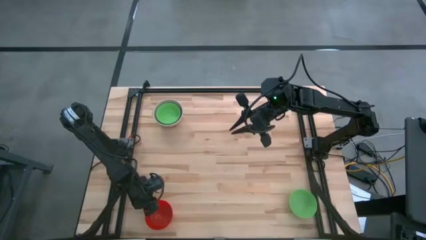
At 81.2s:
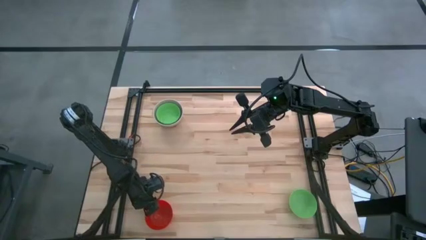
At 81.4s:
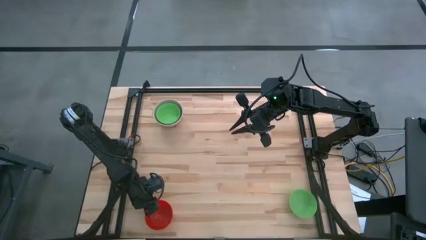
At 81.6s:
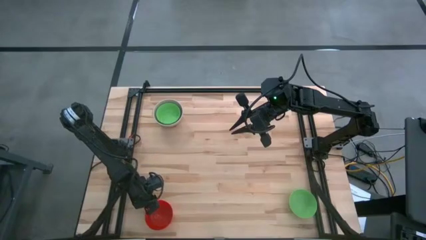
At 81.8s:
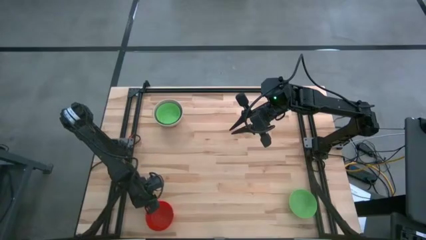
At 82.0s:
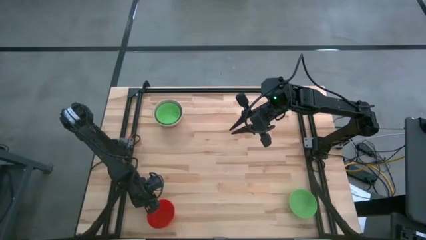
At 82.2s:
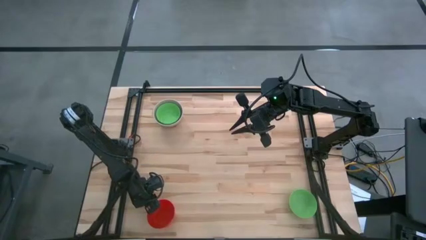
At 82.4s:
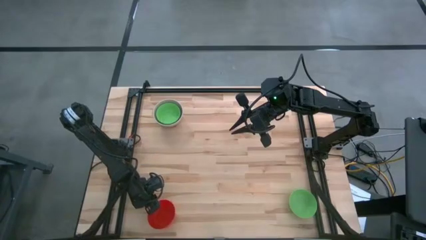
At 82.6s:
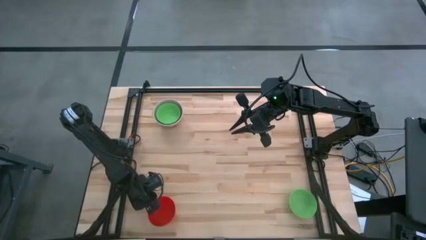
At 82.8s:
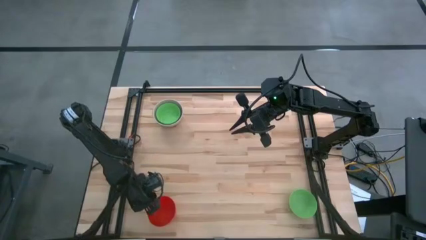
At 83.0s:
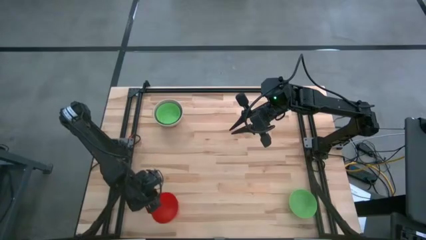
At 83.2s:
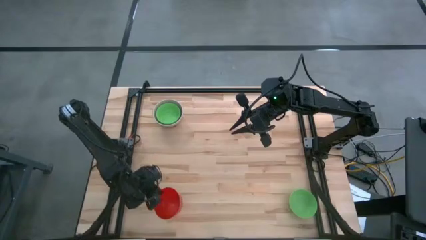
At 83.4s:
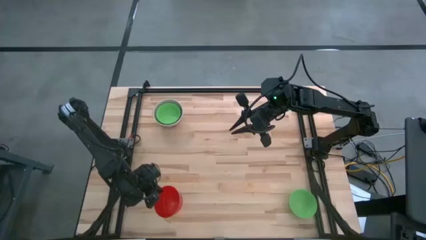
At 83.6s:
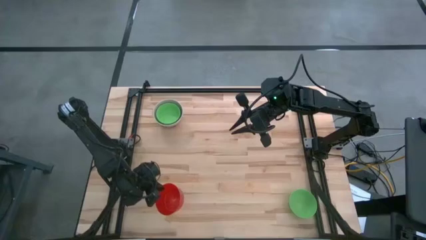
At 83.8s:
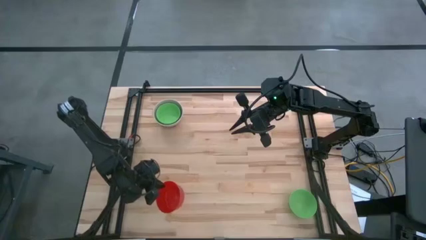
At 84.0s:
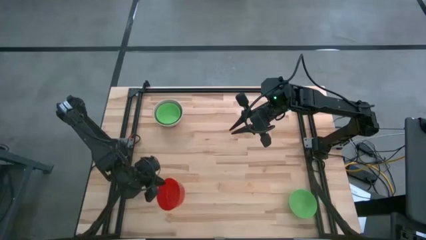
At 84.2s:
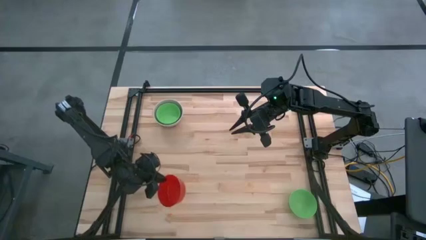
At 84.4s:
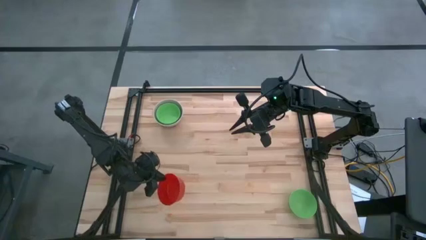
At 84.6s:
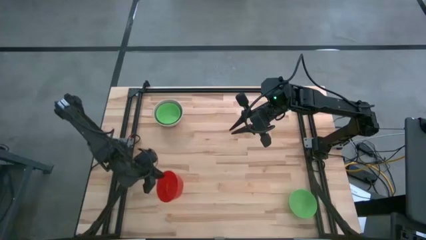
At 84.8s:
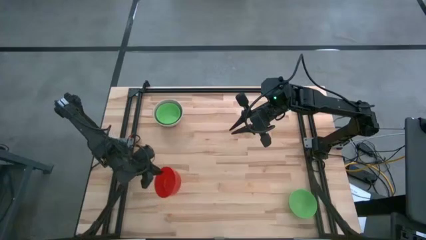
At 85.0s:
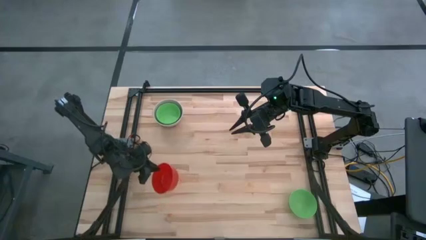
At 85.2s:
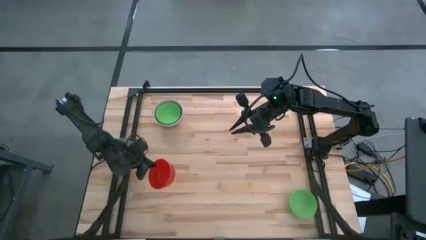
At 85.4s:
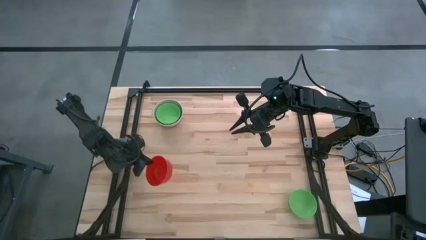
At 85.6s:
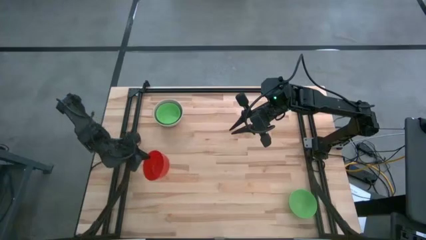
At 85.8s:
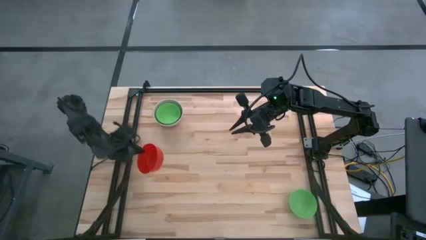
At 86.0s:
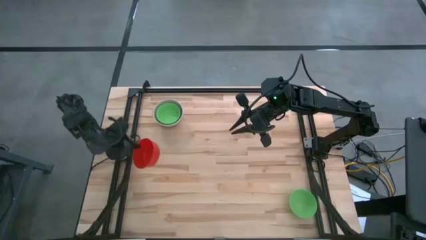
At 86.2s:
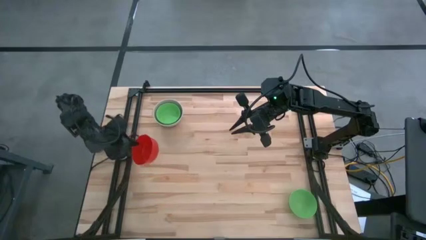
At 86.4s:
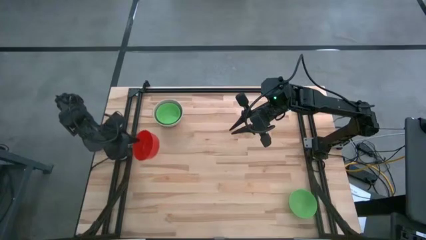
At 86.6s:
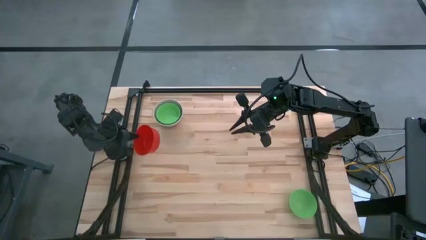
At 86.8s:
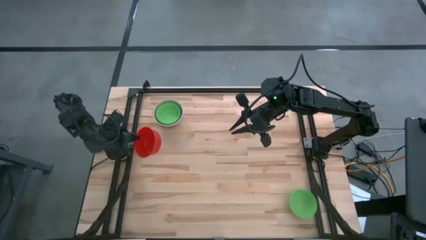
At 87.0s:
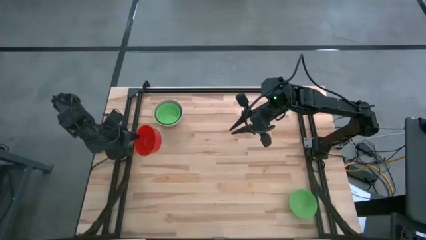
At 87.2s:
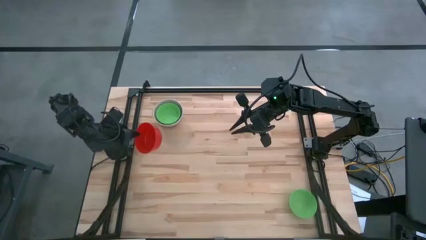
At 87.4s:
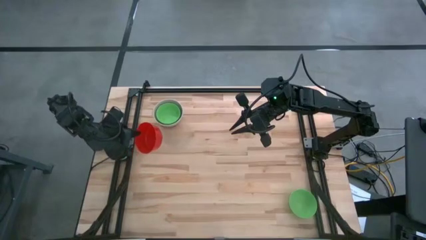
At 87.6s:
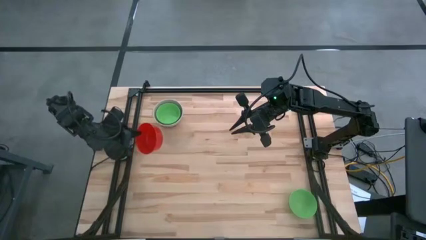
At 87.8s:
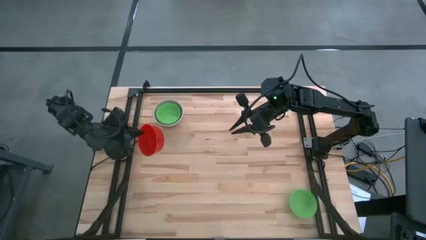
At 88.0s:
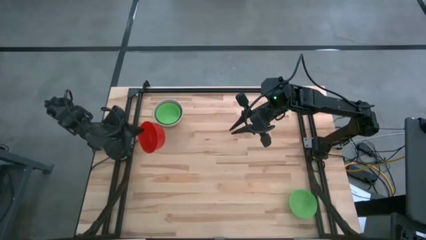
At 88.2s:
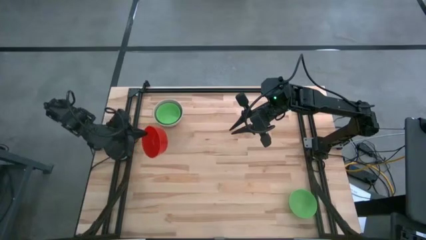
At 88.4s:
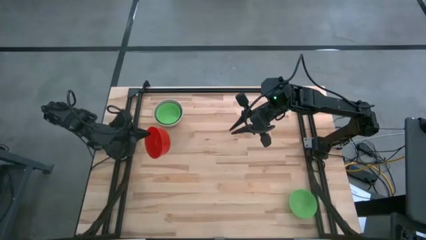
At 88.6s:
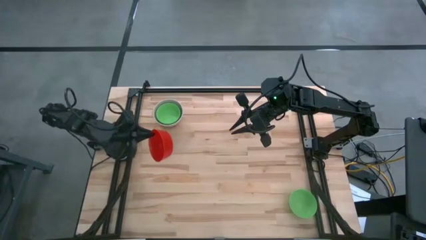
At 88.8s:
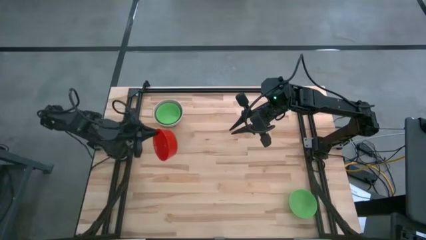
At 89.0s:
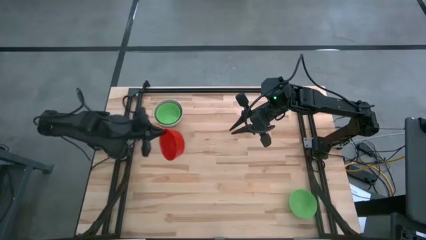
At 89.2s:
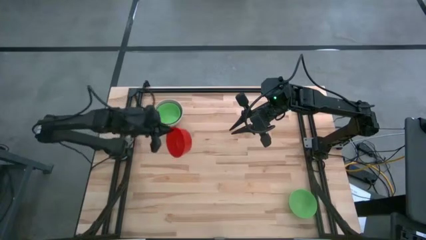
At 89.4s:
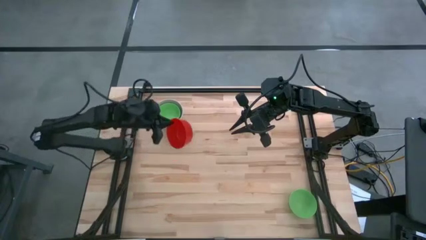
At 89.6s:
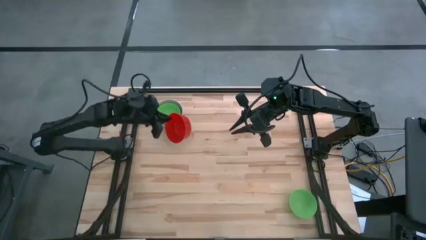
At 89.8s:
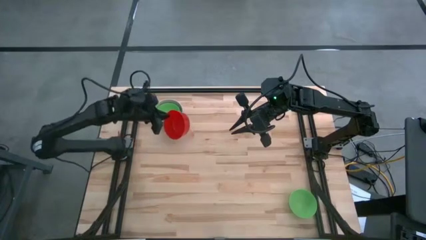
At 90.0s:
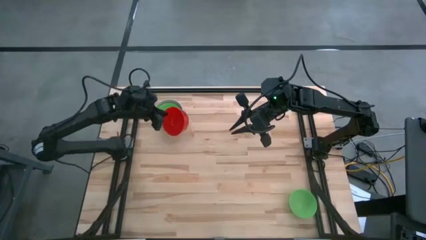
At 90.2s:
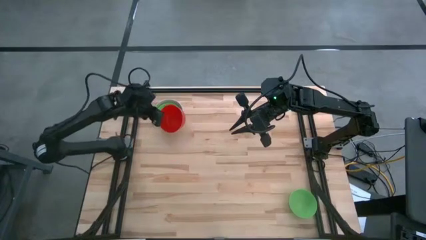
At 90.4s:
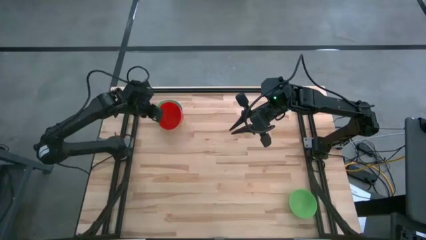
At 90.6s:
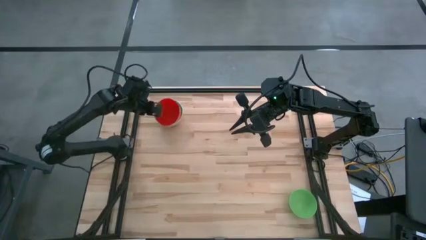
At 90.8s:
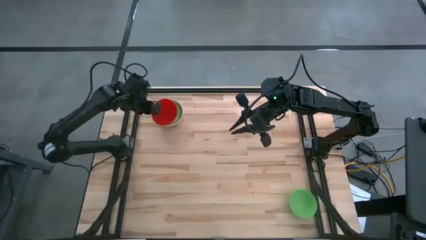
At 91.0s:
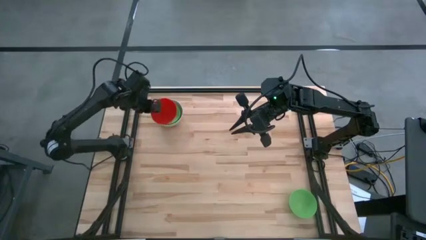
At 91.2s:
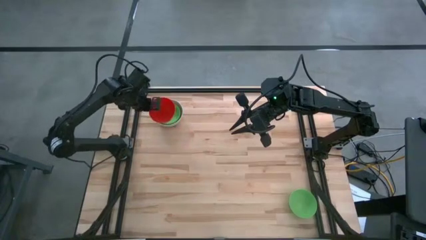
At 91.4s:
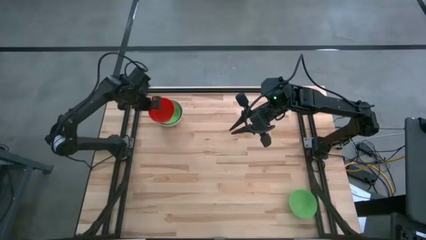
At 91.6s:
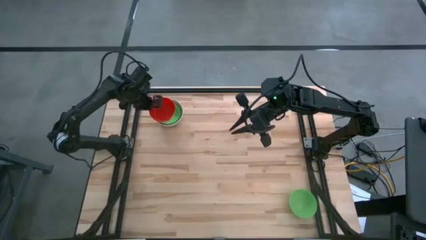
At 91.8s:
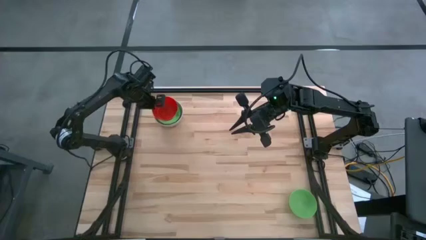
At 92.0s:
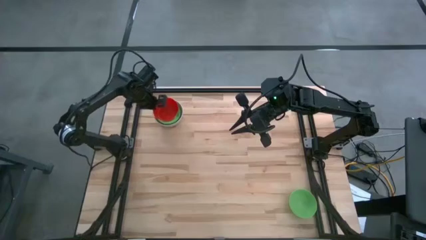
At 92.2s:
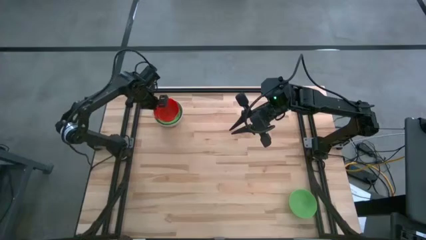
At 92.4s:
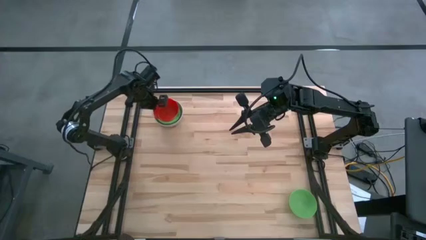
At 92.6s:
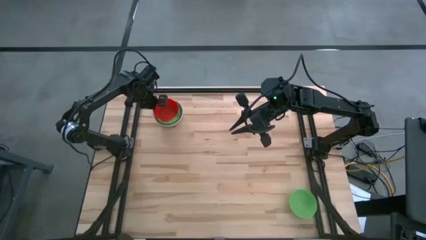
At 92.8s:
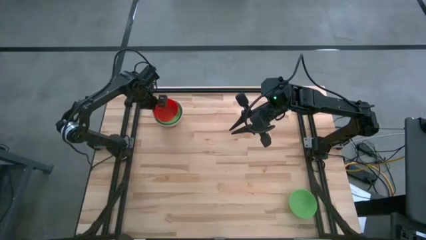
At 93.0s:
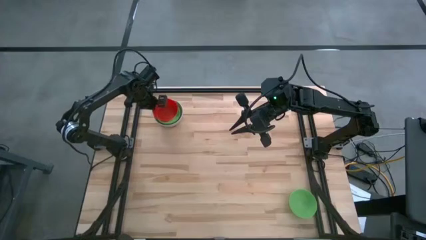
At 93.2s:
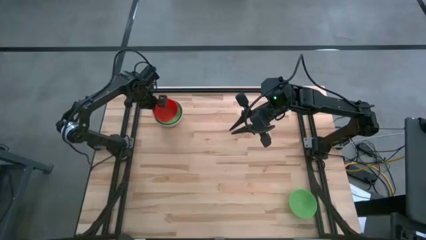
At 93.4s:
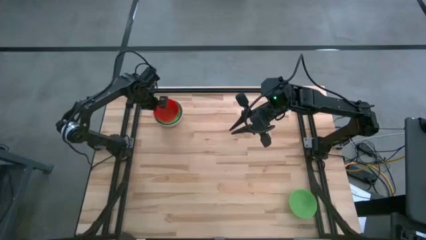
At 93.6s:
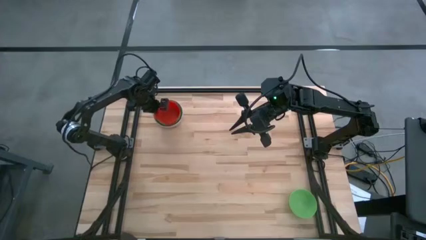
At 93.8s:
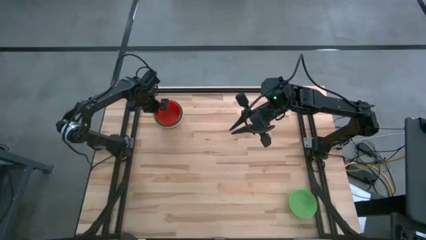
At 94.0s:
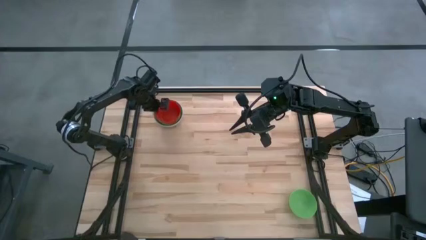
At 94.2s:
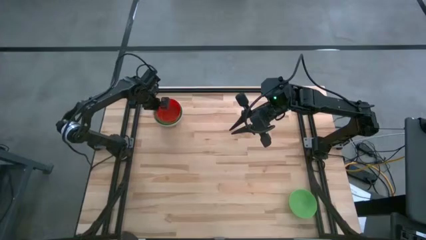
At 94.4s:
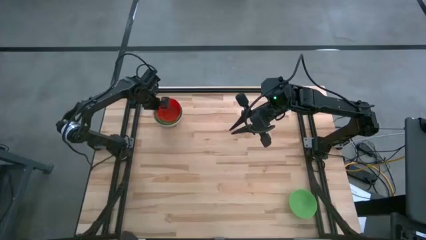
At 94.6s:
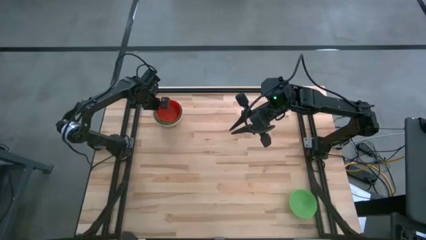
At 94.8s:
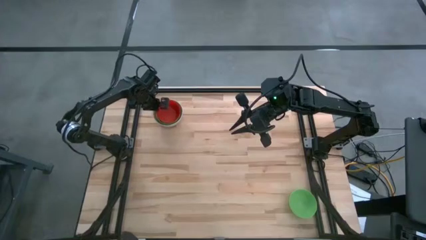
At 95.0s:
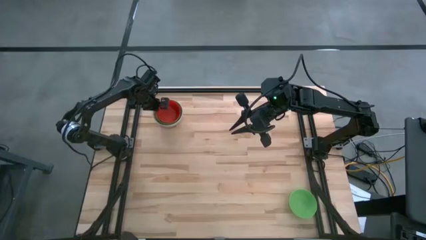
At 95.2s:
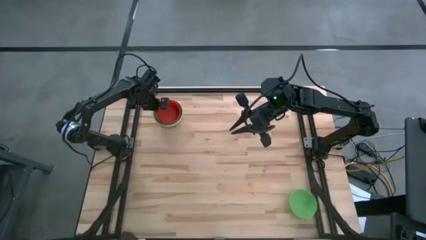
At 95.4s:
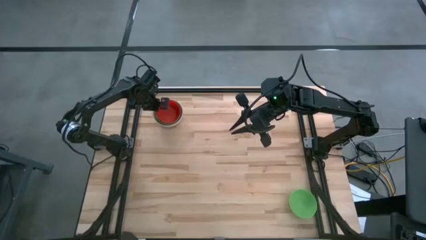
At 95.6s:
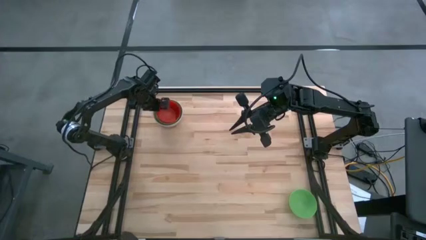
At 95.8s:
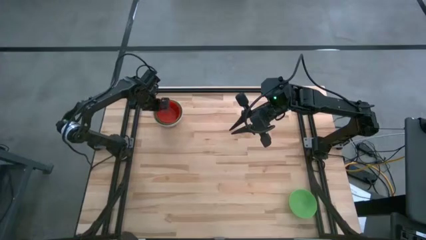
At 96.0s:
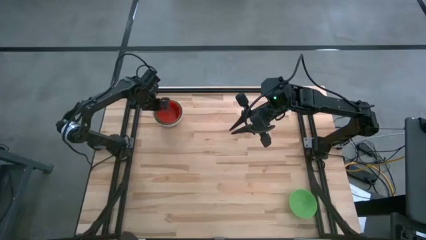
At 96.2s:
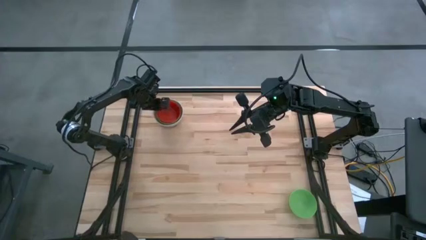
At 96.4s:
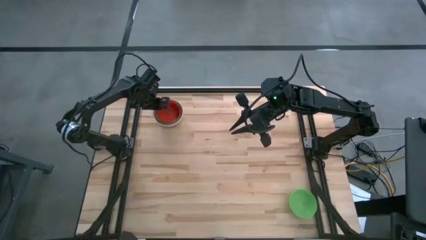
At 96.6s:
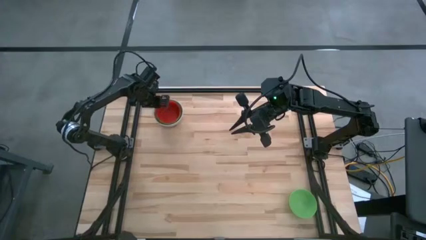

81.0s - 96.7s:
Stack the red bowl on the stacked green bowl
